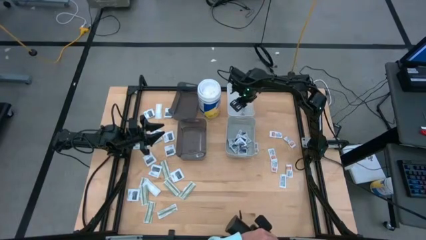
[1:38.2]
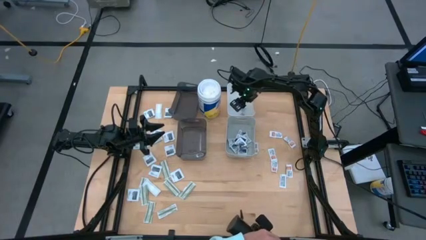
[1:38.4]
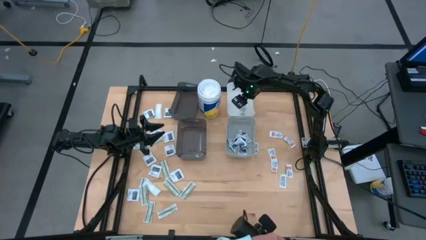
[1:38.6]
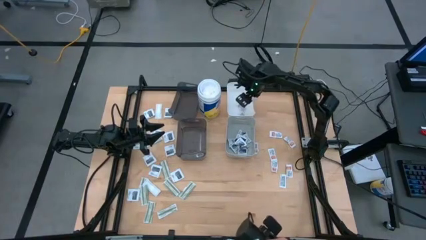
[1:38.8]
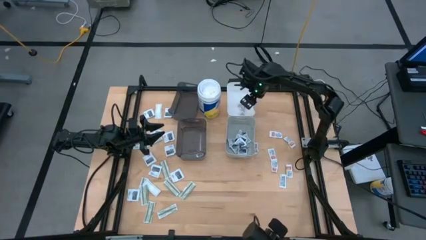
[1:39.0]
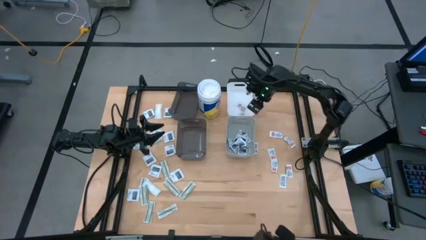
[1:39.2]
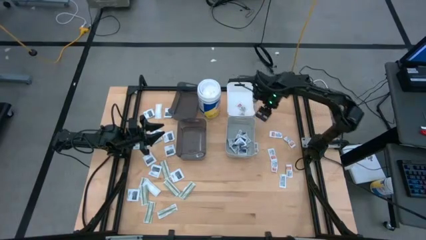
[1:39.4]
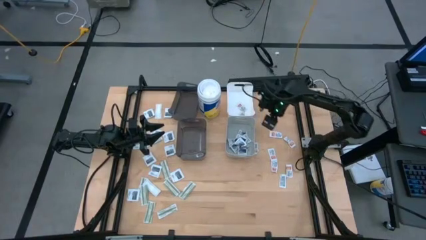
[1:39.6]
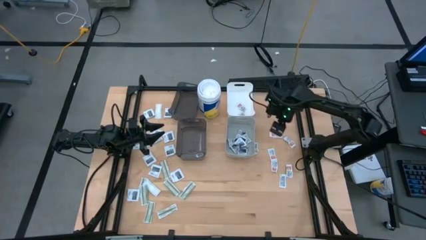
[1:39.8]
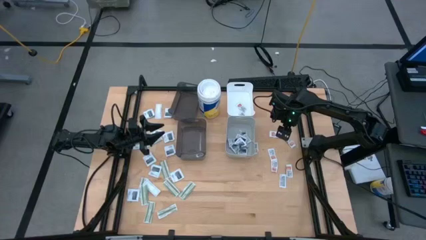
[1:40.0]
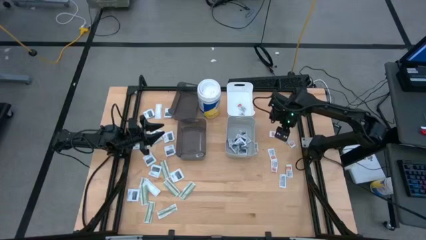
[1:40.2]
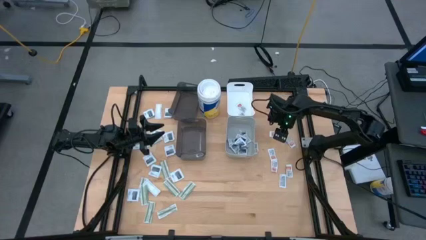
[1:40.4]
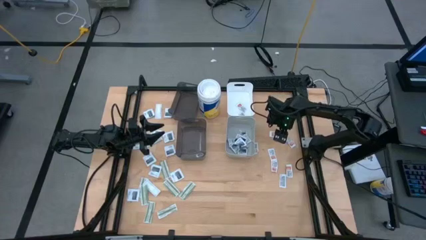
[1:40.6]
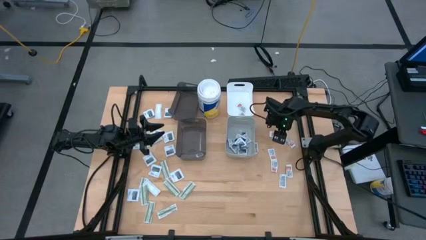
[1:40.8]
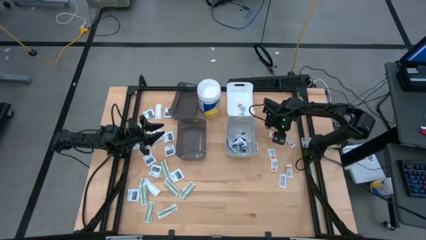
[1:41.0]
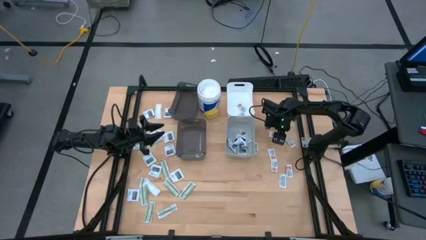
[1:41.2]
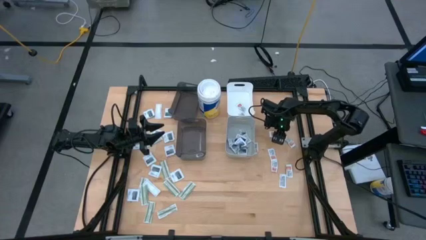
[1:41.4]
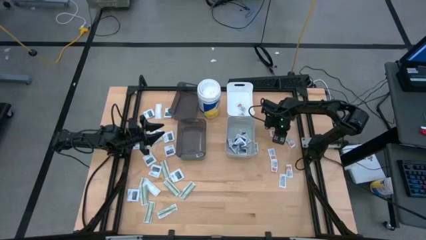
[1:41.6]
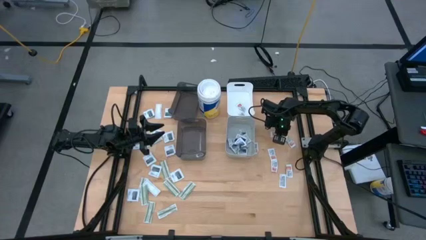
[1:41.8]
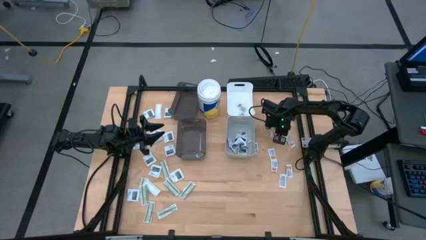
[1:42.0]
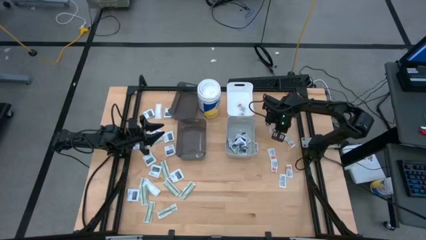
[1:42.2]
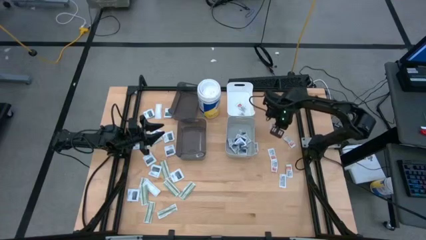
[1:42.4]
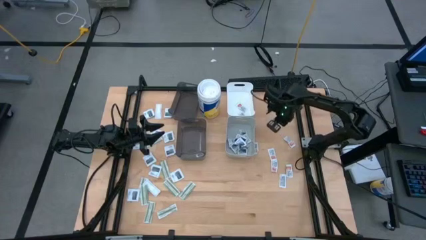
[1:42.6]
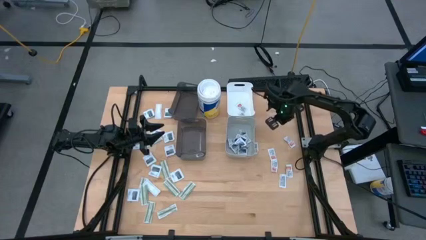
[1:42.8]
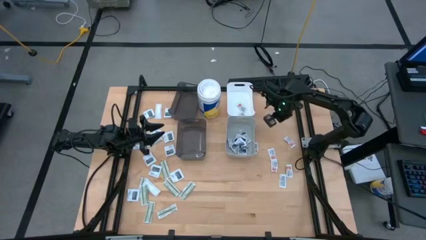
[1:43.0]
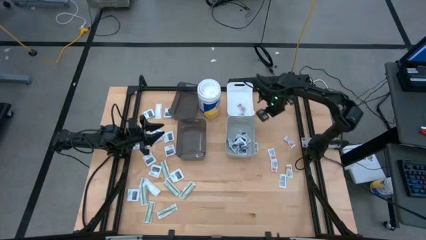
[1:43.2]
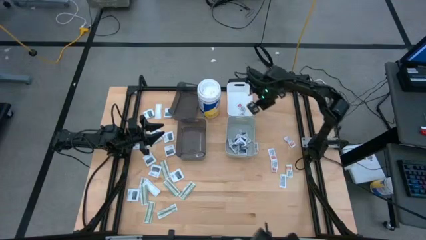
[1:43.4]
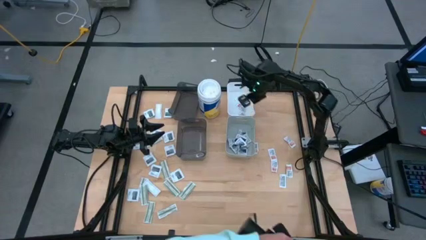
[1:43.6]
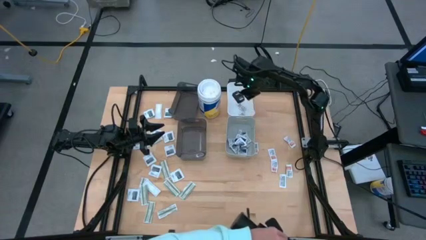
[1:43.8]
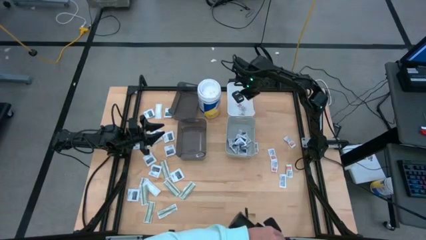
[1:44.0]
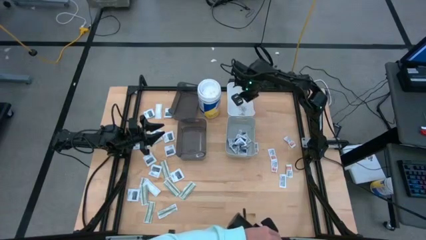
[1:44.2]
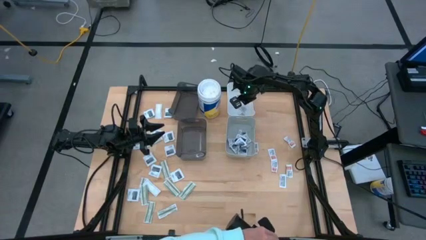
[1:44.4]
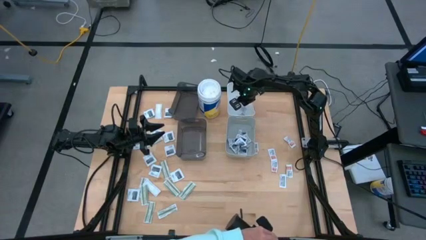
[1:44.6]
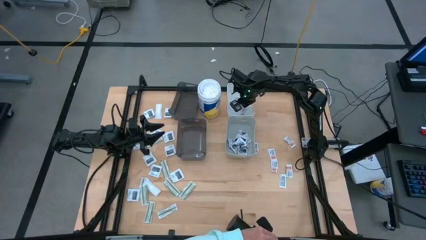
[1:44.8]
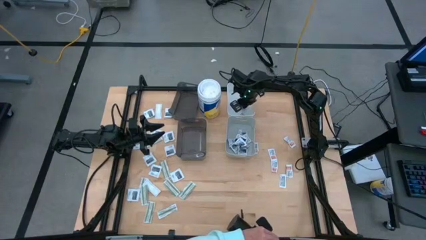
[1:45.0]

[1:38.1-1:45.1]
Task: Pick & Place First Aid Supplies
Put the ointment pack into the white bin

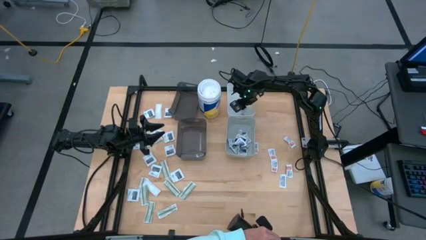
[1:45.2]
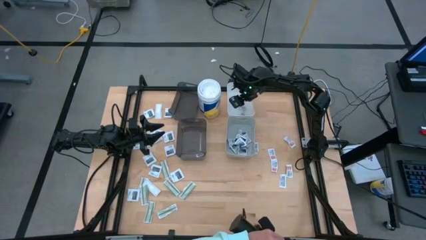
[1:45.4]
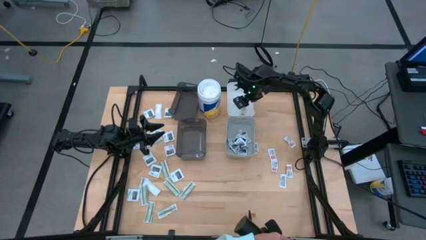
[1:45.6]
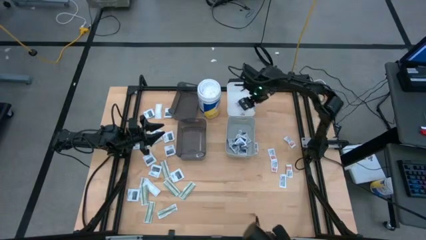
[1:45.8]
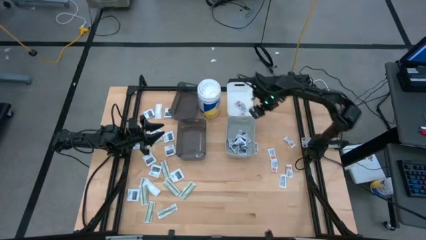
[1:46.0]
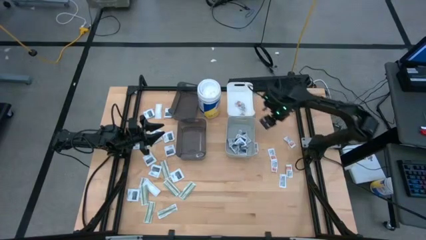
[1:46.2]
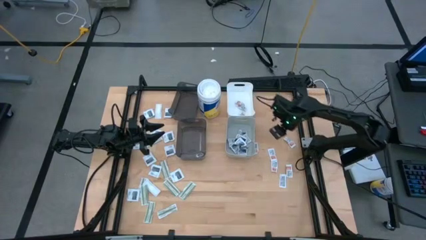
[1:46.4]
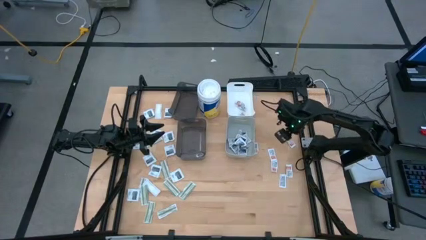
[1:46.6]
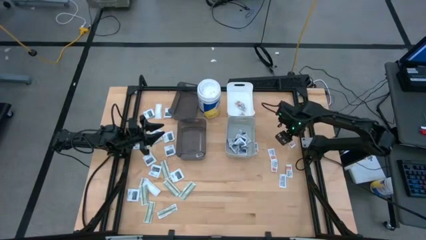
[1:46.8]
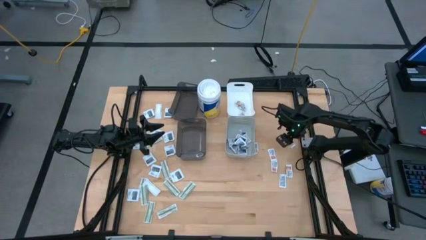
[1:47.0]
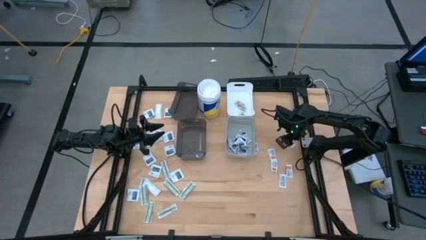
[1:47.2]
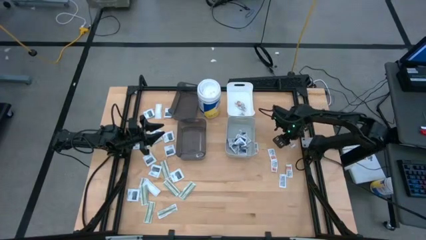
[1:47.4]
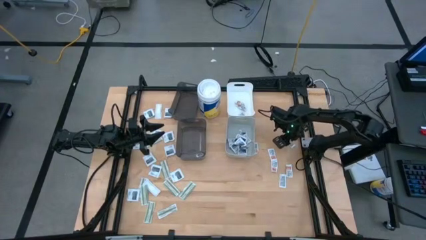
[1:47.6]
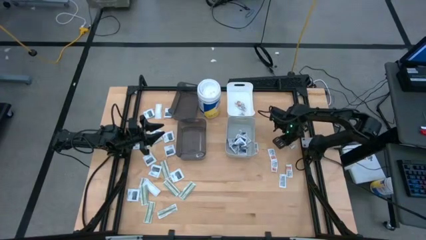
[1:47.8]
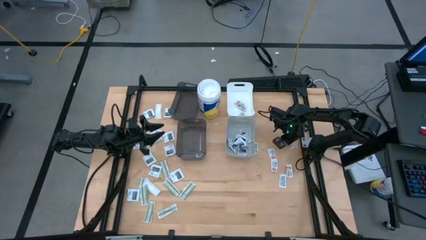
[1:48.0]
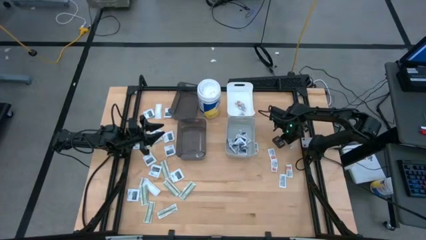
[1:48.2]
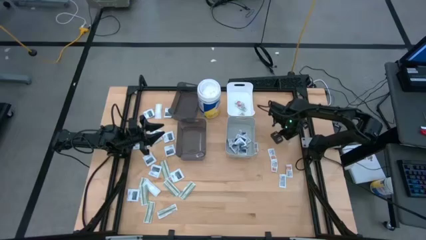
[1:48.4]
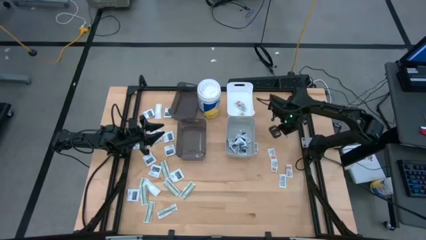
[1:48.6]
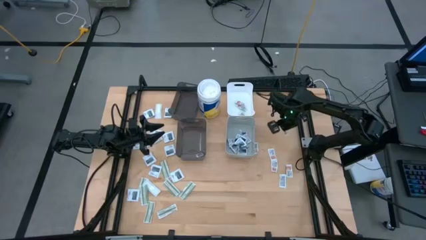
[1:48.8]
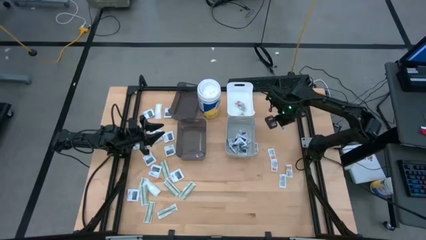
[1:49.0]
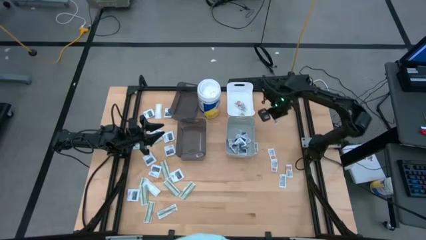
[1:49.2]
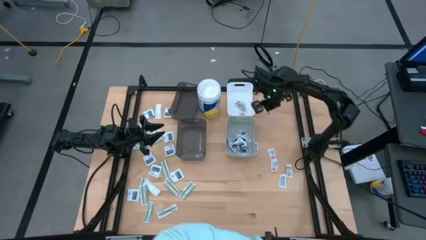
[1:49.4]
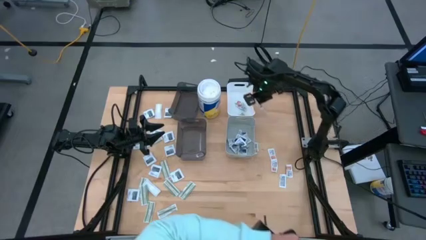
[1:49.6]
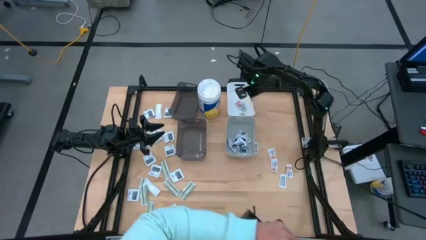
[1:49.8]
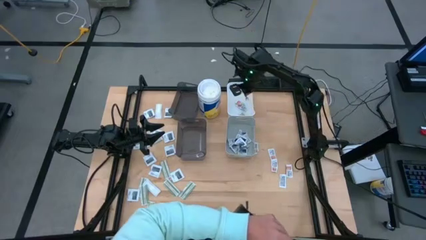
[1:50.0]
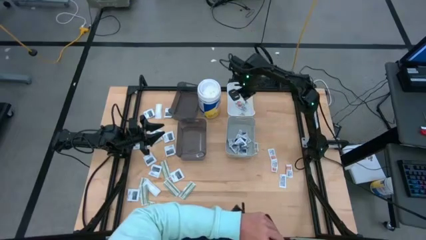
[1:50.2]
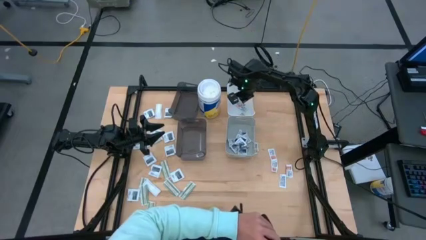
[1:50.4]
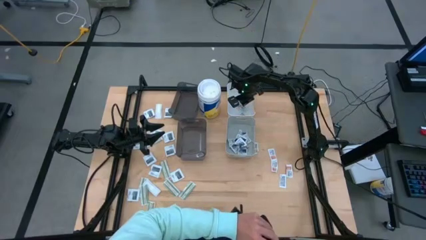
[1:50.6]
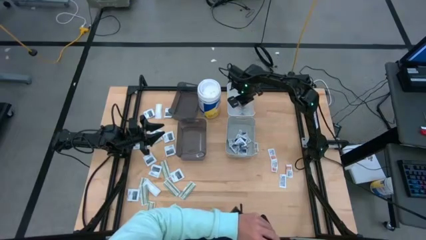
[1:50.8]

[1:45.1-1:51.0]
Put the ointment pack into the white bin

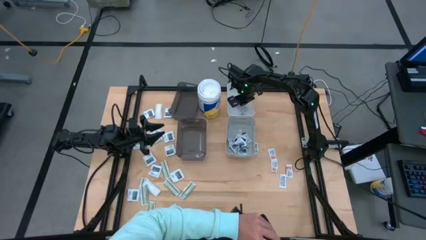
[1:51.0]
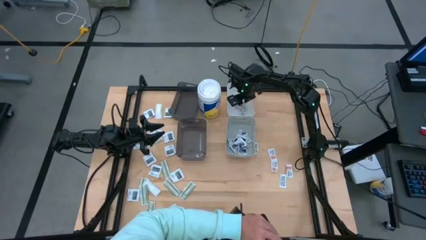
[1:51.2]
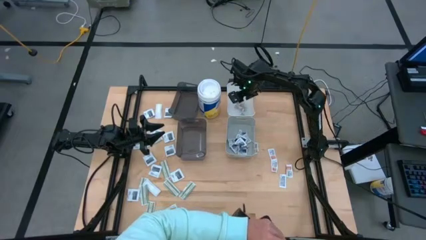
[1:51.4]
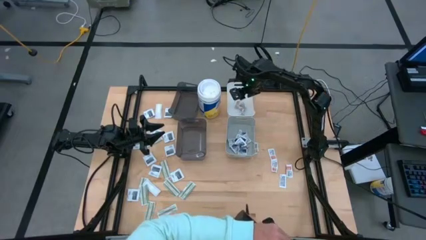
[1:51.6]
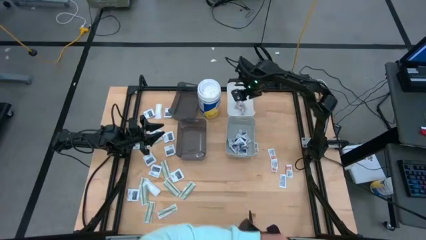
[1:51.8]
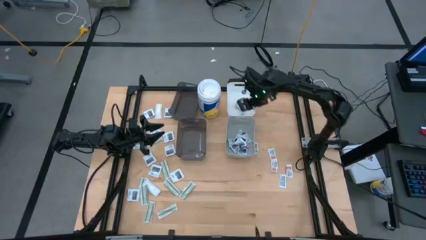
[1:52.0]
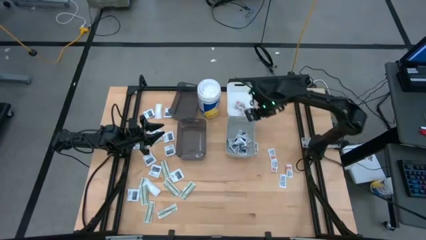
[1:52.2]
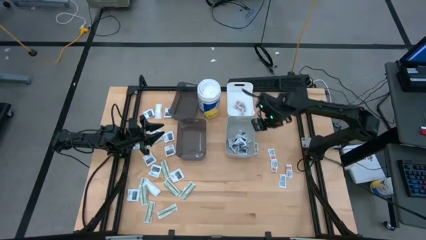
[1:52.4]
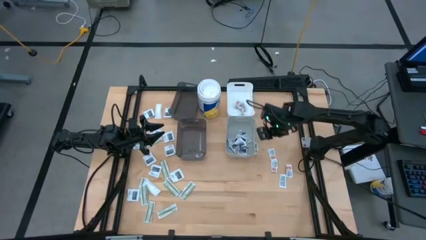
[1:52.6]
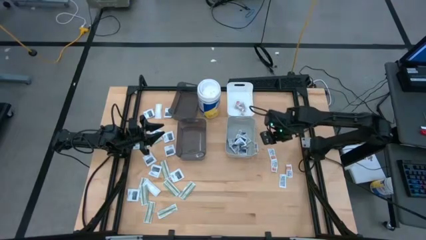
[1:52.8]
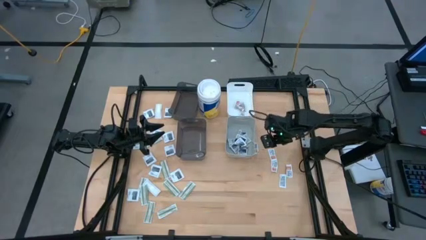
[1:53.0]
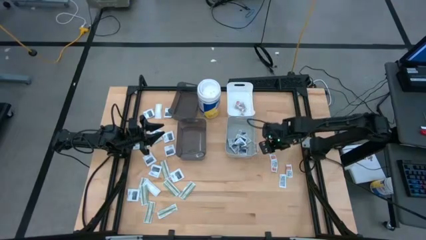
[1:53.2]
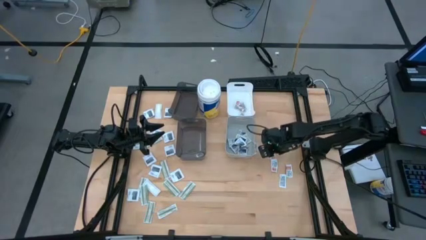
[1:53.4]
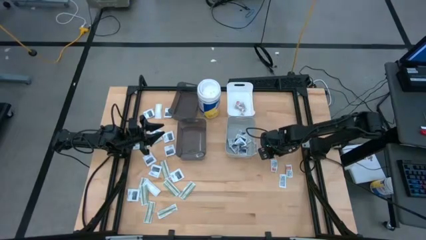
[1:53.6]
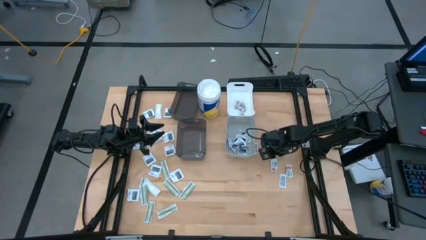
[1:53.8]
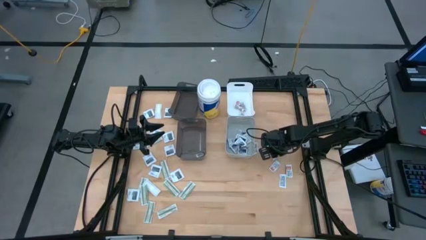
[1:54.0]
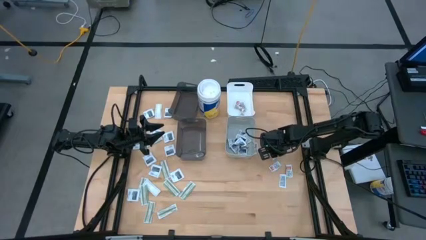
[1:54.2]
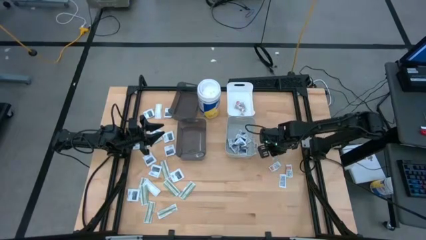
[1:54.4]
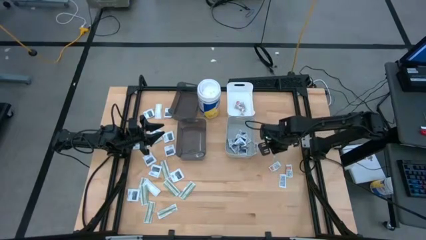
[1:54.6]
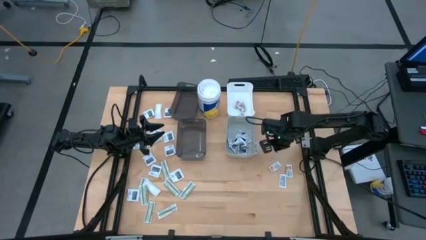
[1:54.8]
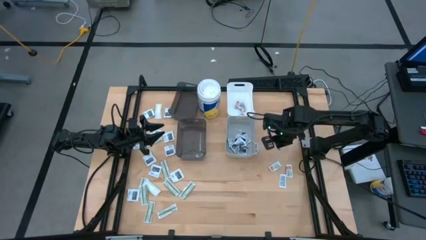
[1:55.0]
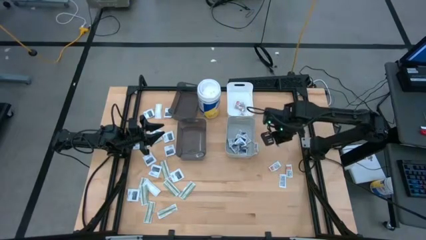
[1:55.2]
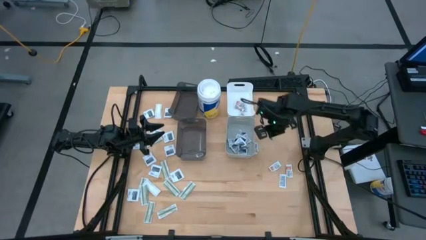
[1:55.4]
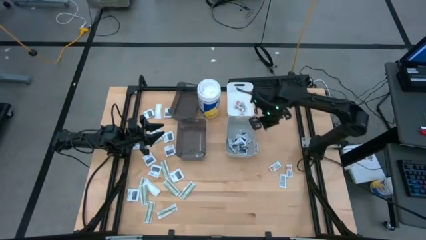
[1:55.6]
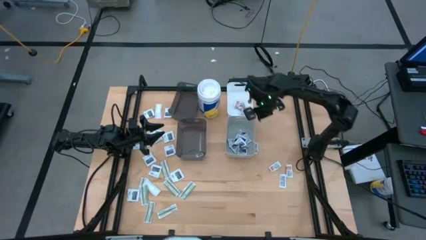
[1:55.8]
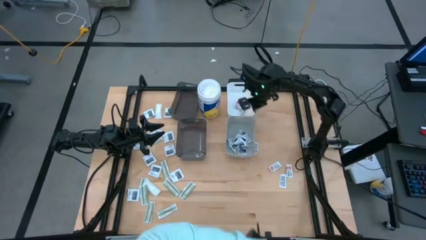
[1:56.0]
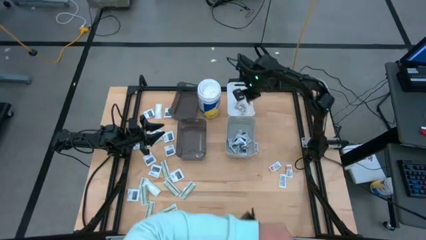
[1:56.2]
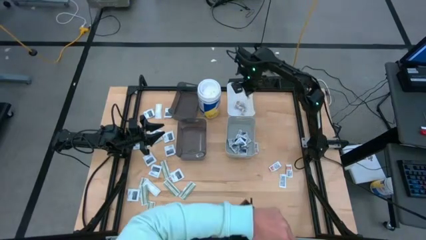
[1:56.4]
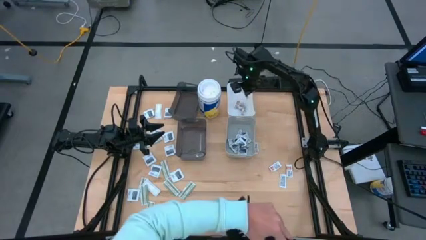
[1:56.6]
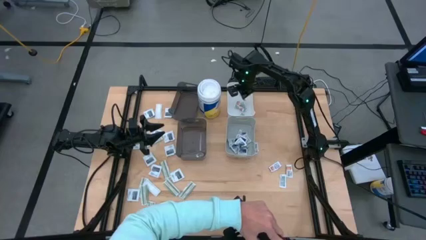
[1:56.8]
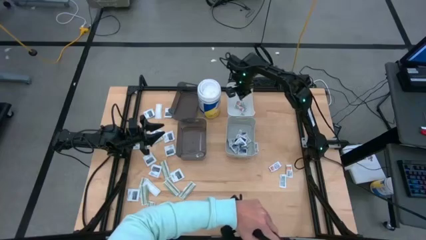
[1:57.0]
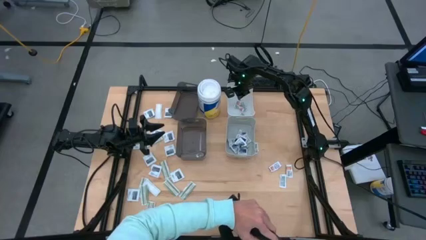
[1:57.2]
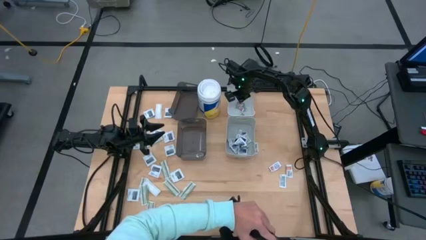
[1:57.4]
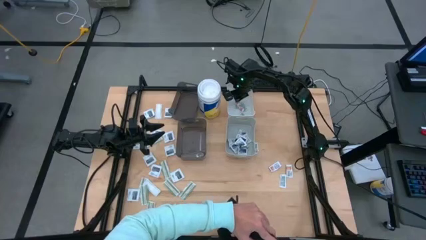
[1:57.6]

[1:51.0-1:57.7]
Put the ointment pack into the white bin
